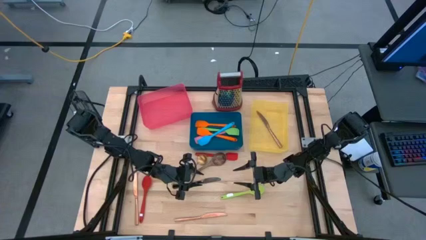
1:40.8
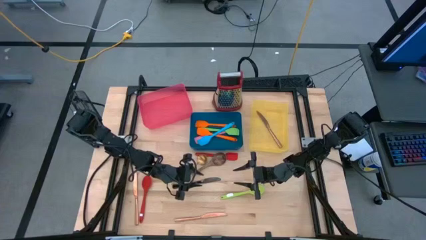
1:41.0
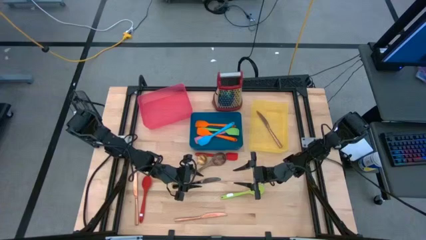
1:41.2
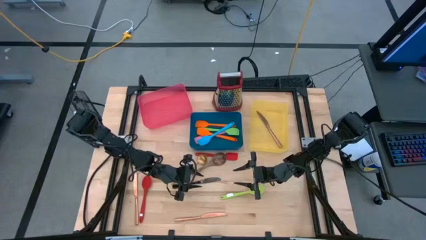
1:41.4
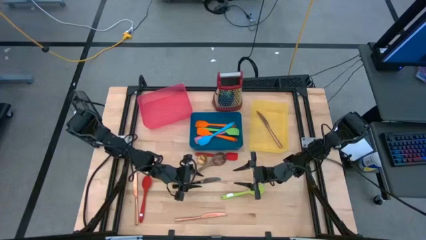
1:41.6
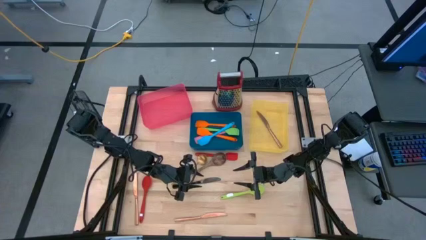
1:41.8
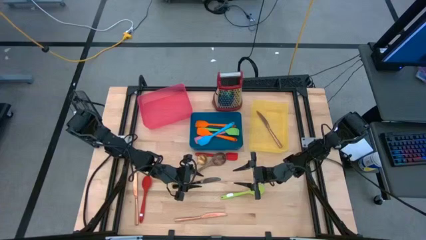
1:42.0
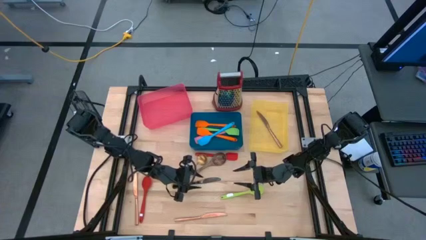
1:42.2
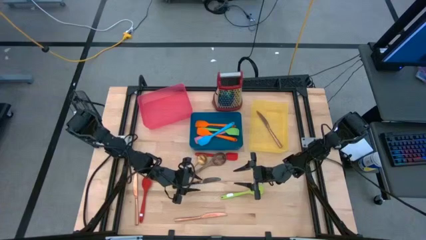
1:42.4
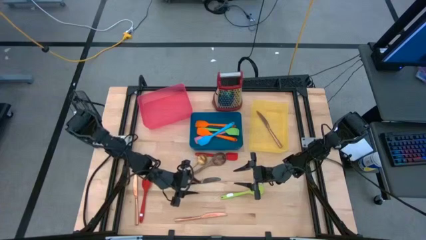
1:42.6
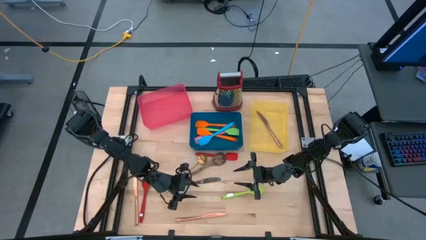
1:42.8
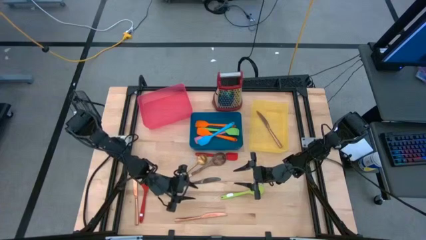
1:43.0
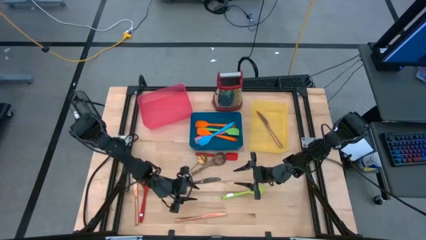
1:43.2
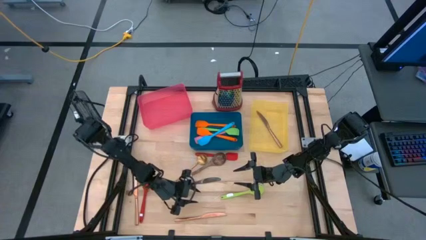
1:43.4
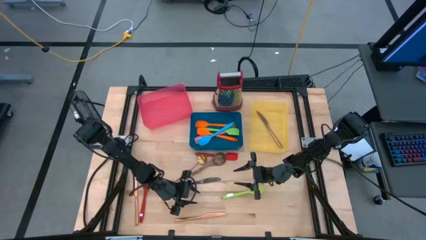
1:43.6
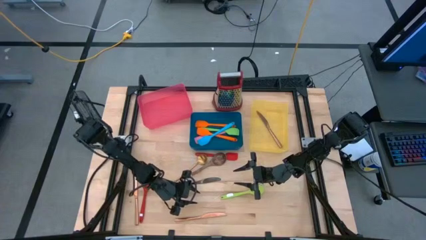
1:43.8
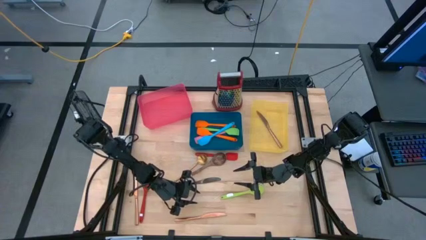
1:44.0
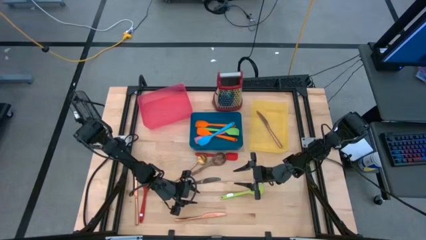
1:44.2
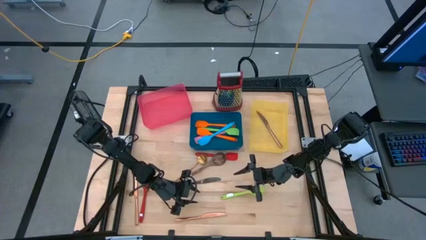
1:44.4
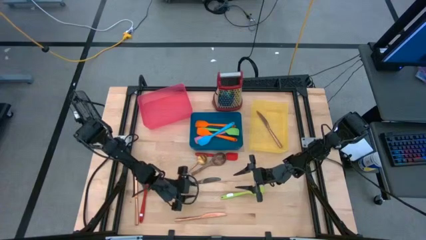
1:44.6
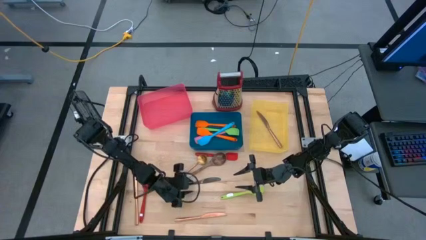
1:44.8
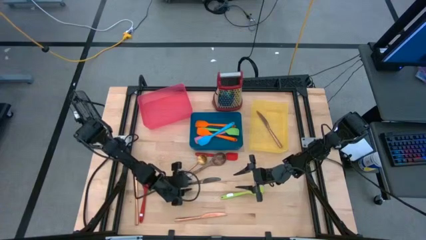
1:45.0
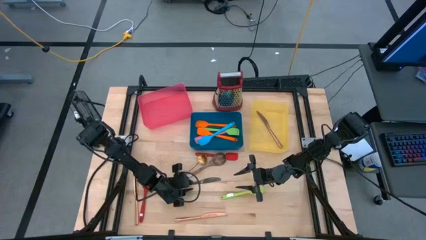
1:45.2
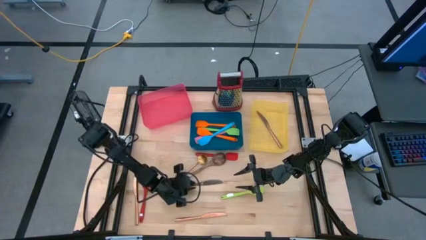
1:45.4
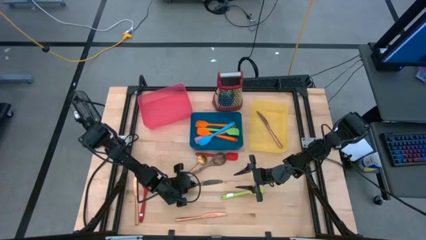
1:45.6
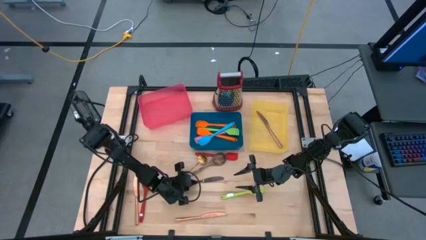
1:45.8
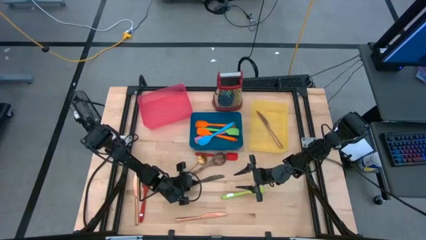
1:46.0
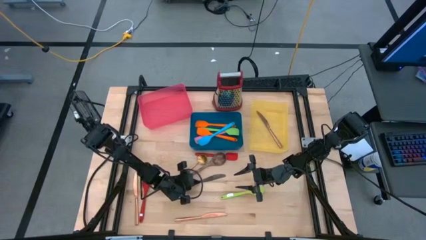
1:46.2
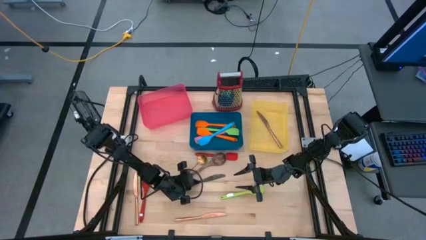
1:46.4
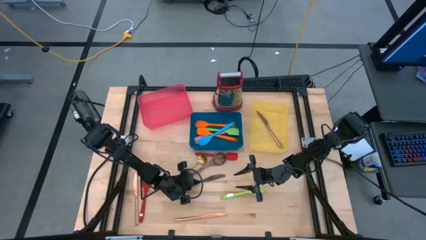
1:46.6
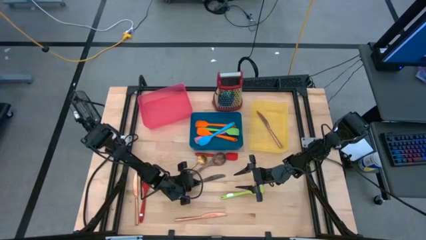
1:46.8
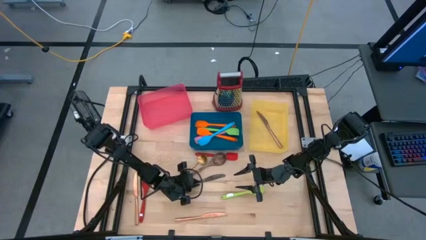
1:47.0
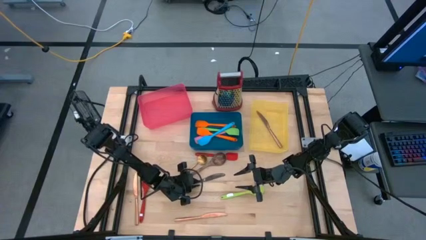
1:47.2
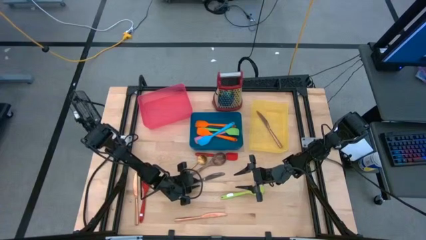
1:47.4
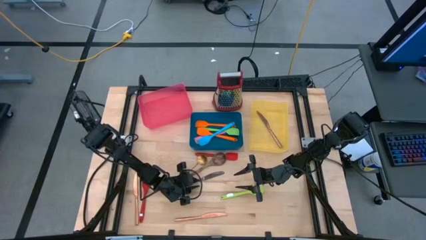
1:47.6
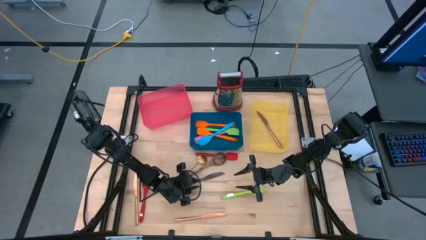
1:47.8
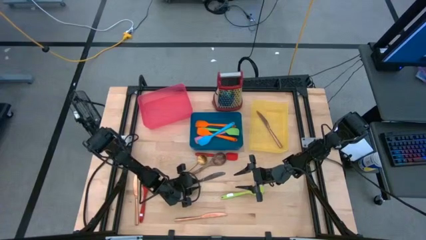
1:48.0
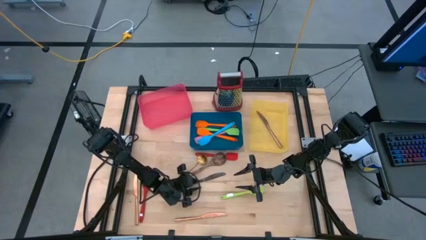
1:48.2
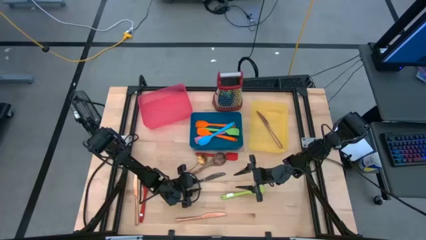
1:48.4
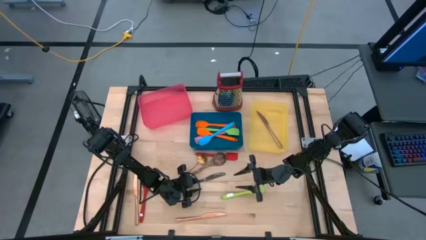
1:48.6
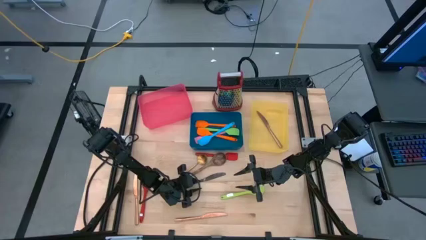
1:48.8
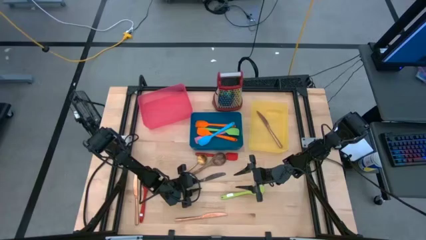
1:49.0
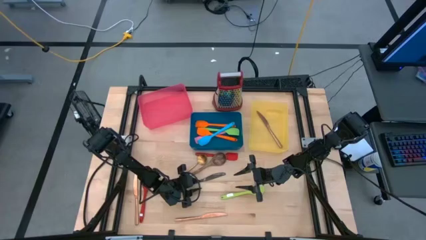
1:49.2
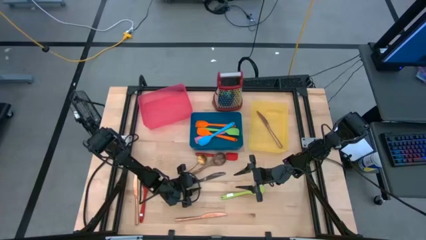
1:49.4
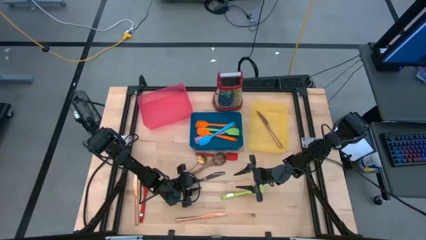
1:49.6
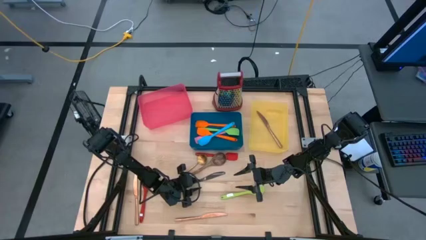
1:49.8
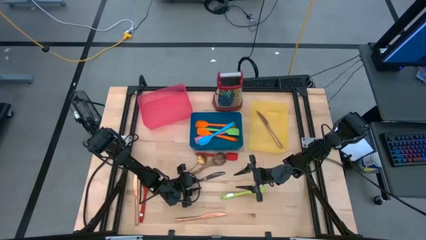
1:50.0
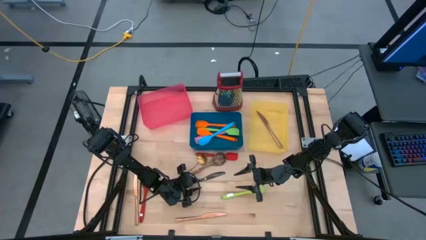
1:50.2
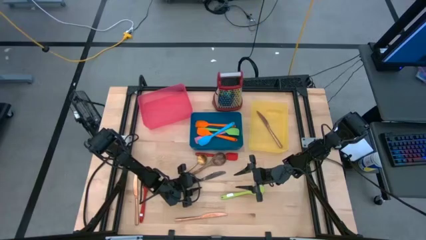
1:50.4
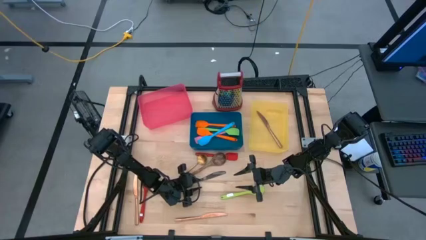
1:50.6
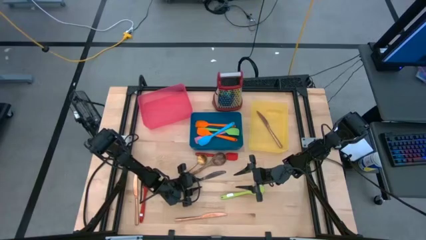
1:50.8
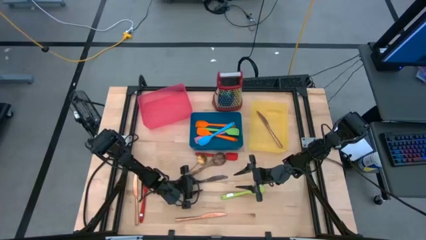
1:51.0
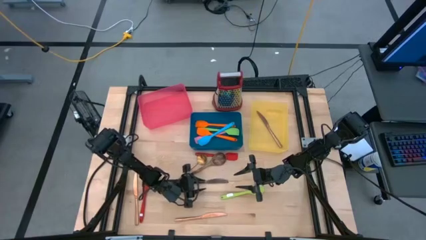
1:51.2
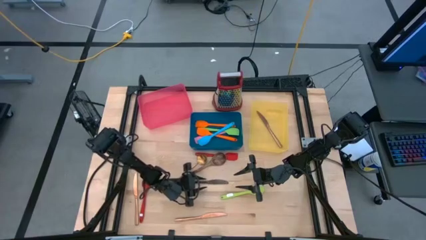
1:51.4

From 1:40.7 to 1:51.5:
Task: Pick & Place Kitchen Items
Put the black table knife into the yellow bin
